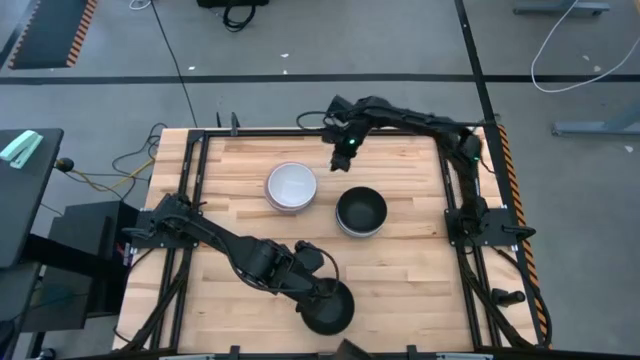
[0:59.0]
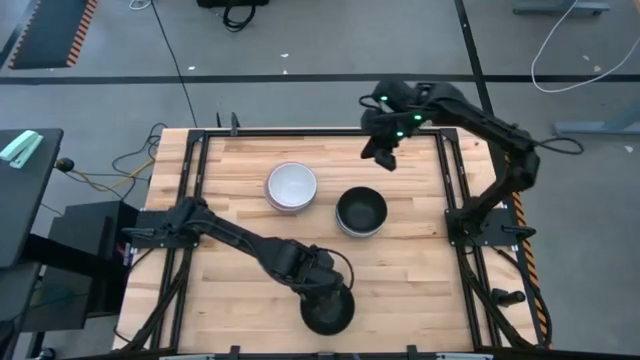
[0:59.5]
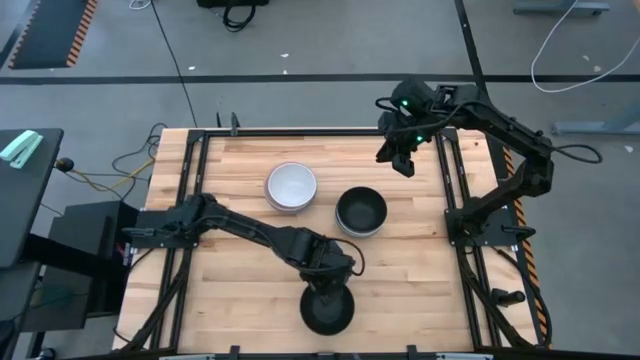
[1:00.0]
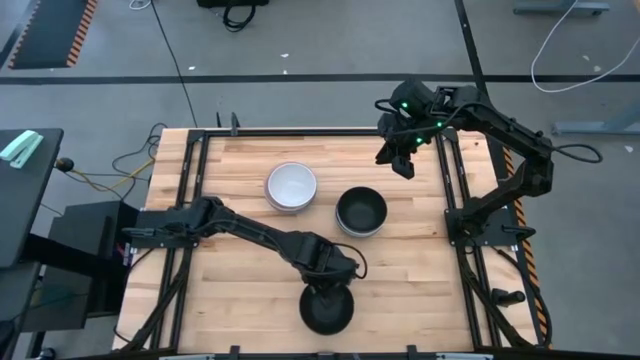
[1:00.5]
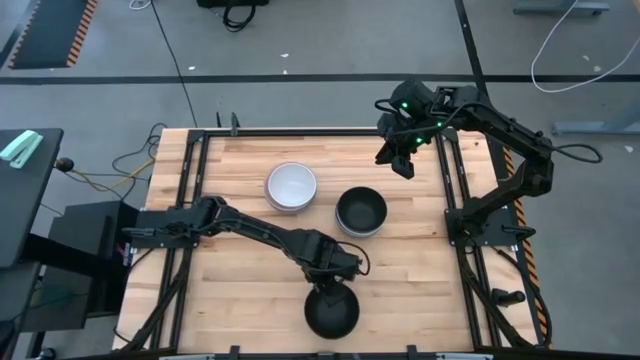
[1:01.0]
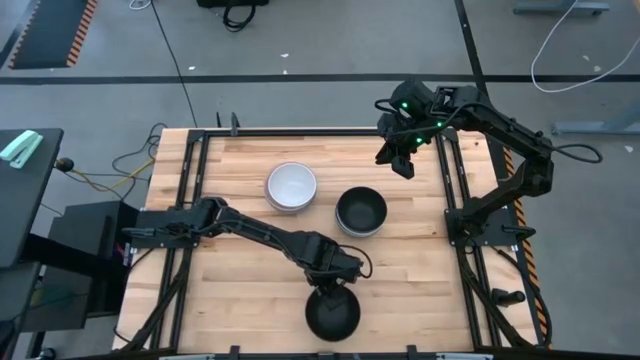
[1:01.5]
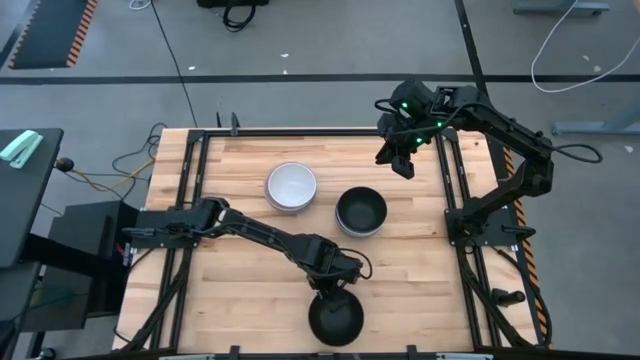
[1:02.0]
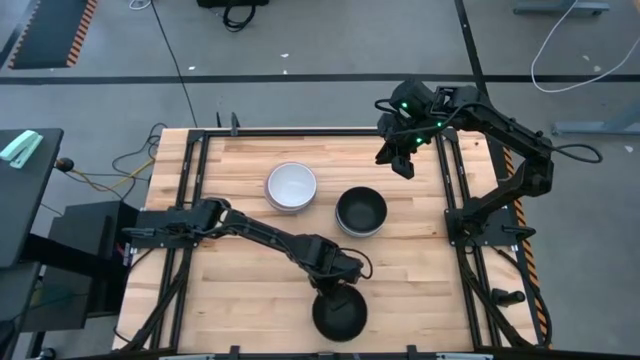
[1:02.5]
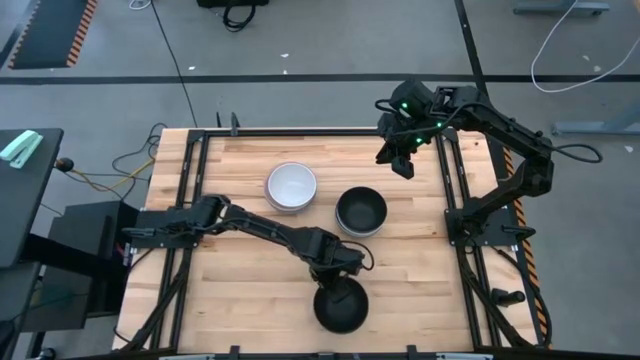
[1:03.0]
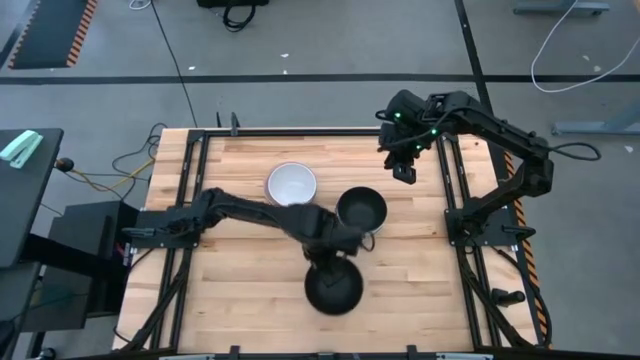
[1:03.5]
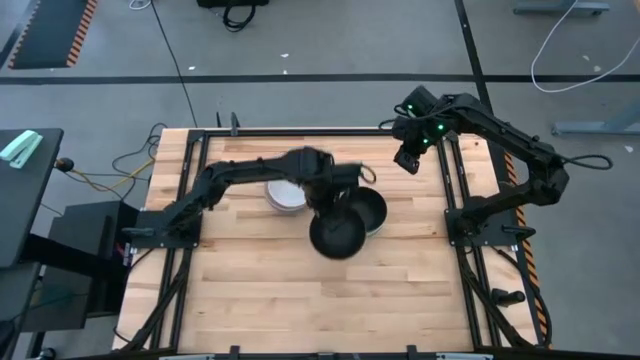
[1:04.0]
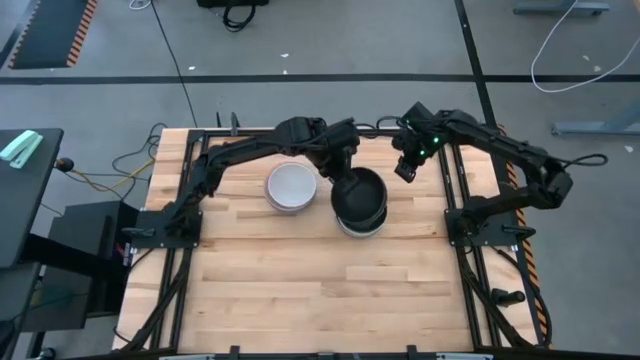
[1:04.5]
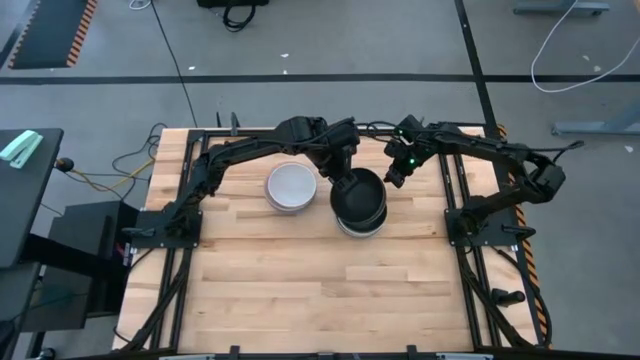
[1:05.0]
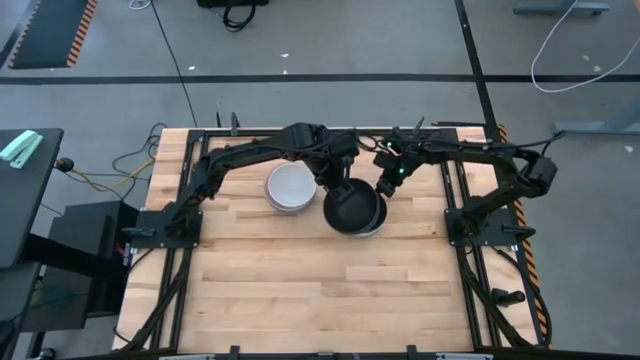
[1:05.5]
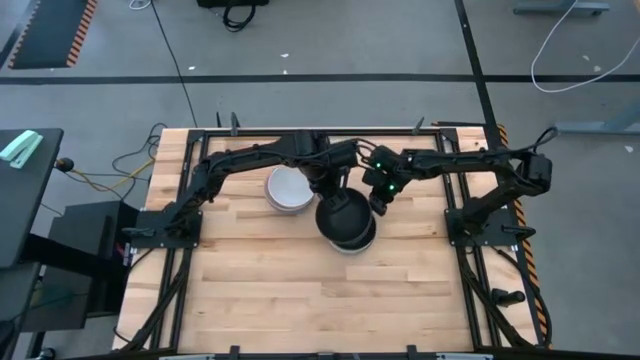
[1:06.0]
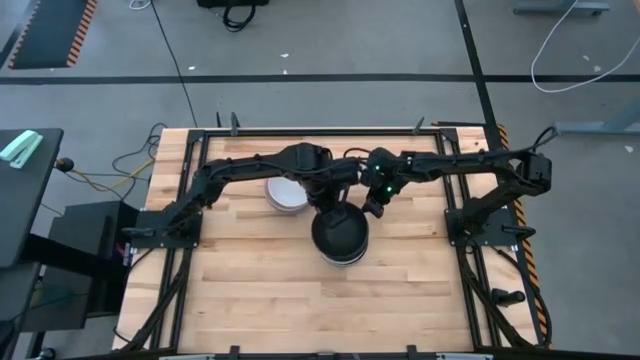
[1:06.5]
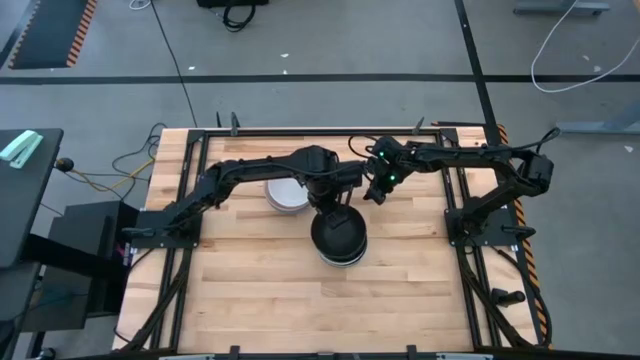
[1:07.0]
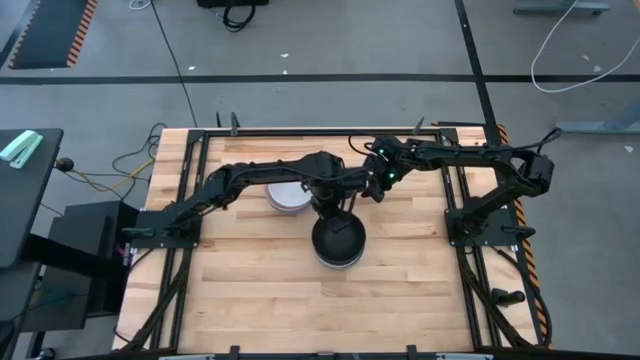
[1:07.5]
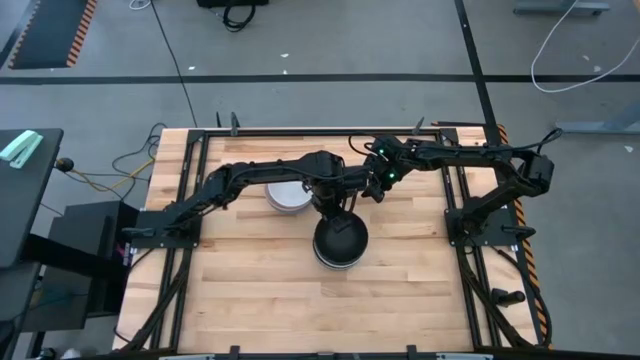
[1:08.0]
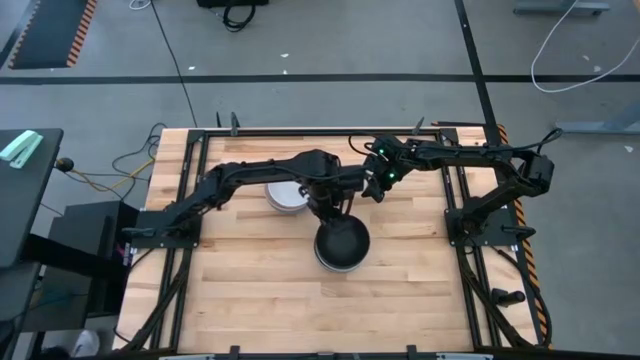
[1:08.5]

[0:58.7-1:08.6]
Task: Nest bowls inside each other
Stack the bottom stacked bowls on top of the black bowl

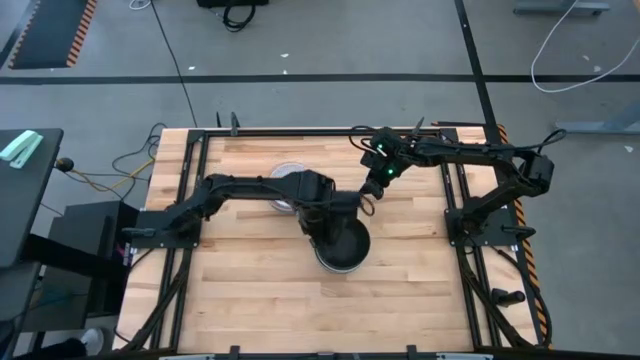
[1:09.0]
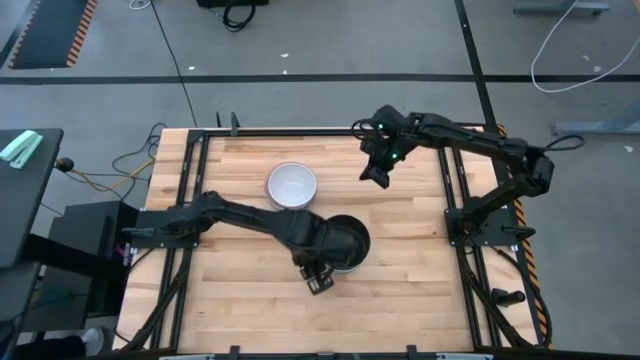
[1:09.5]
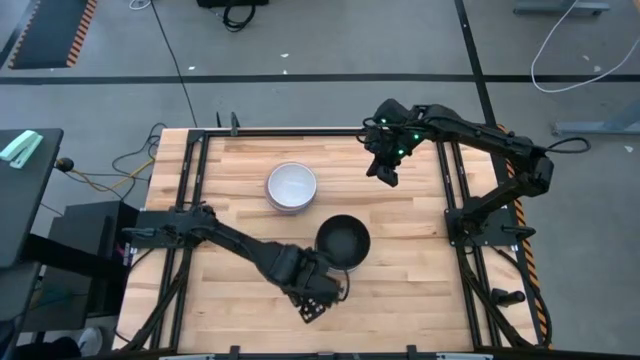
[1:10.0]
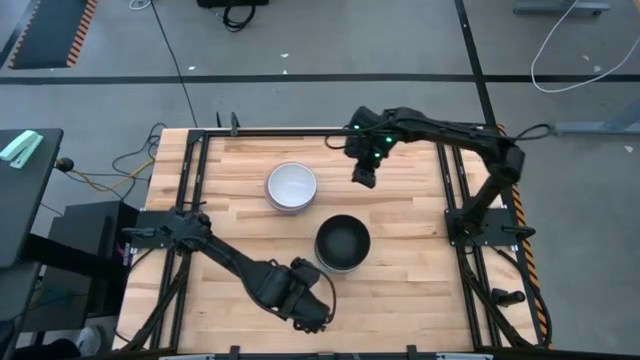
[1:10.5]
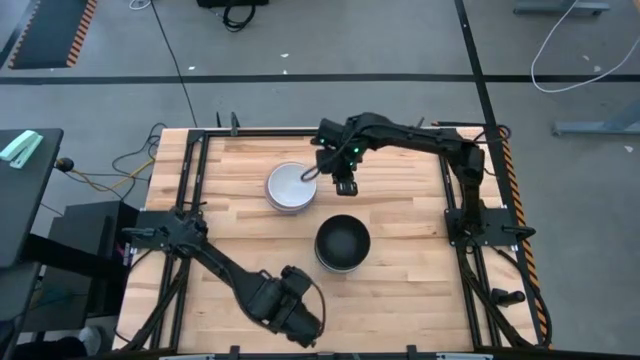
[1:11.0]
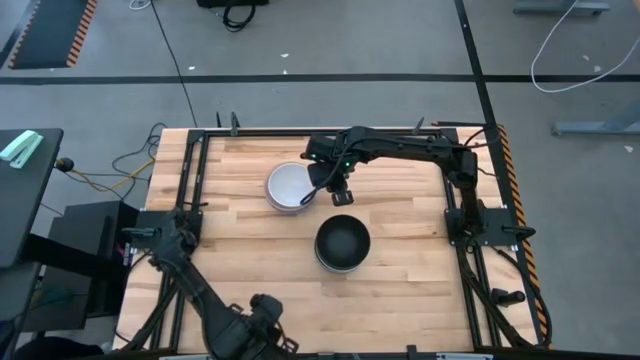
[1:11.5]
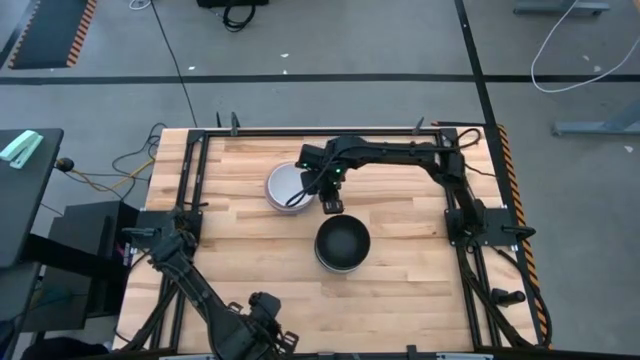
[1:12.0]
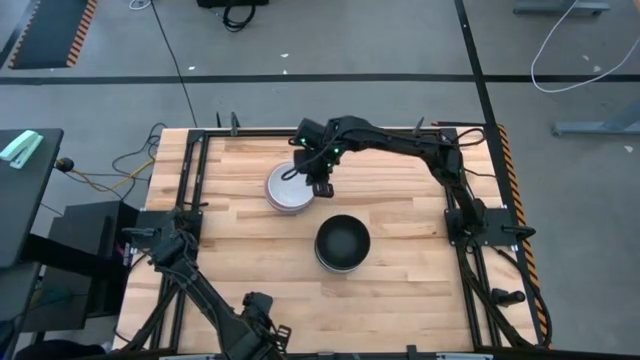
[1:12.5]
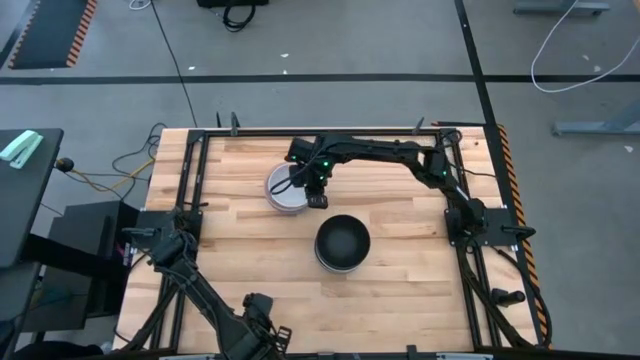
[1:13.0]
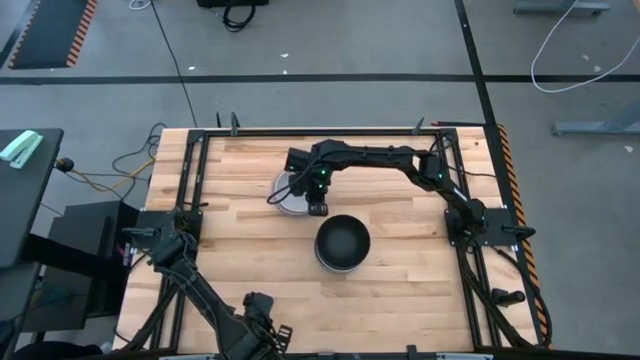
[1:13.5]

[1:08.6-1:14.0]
Adjust the top stacked bowls

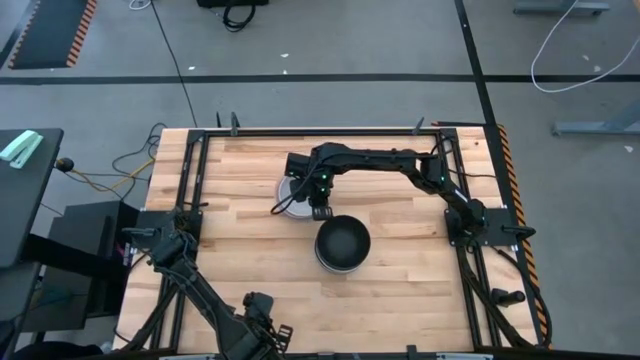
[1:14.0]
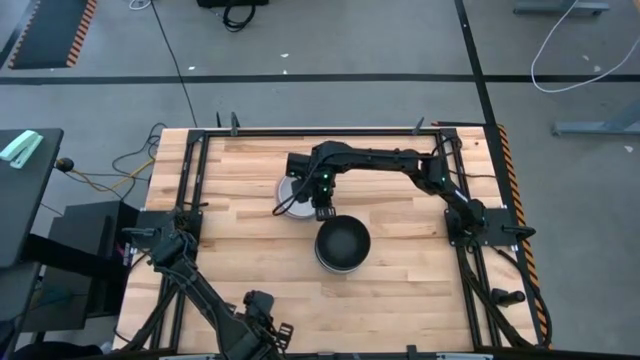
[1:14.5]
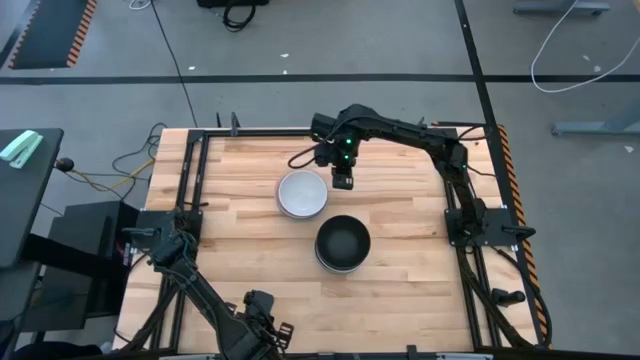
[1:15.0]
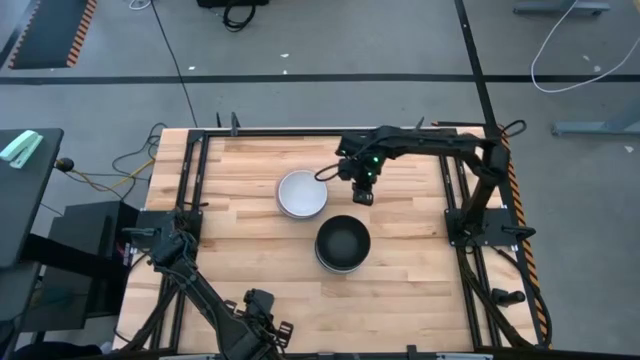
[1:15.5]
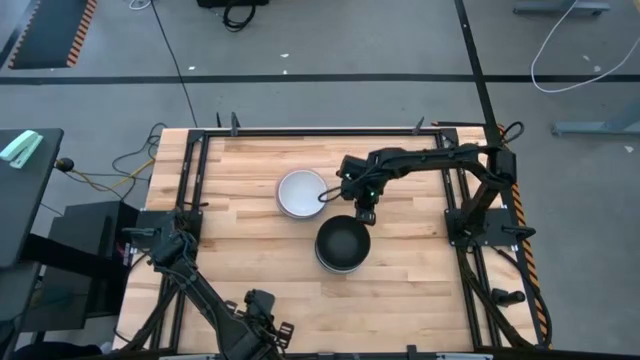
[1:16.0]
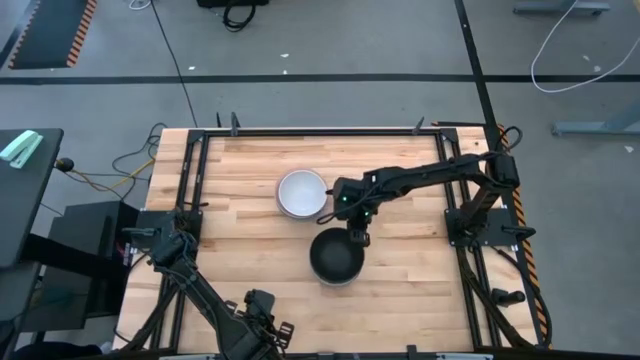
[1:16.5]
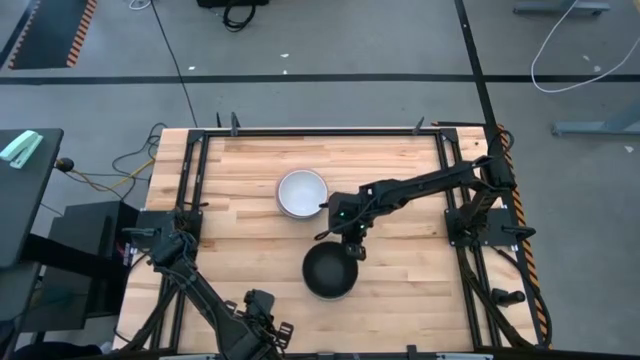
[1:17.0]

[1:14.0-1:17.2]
Adjust the bottom stacked bowls

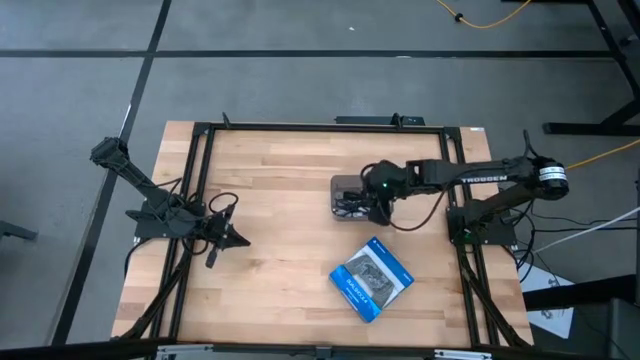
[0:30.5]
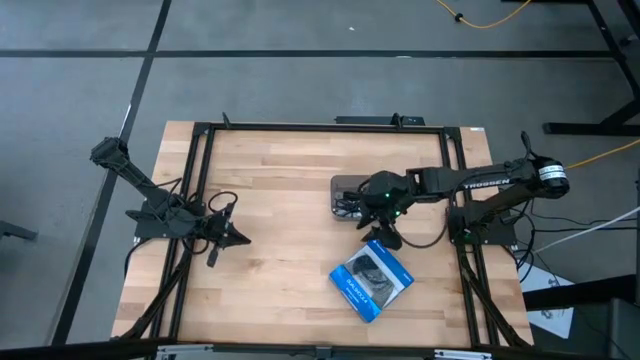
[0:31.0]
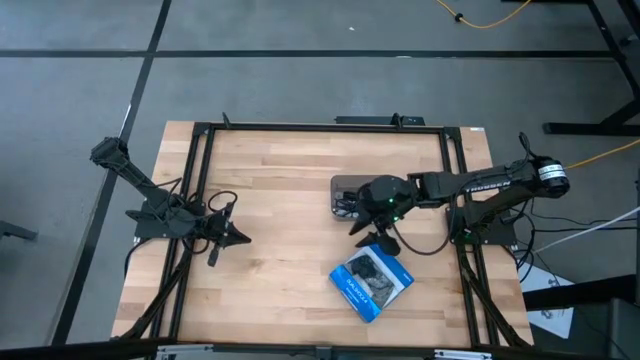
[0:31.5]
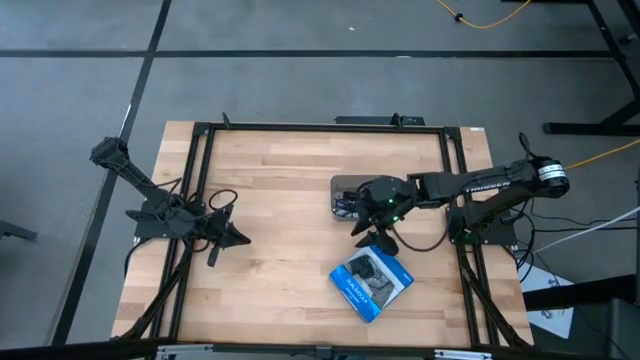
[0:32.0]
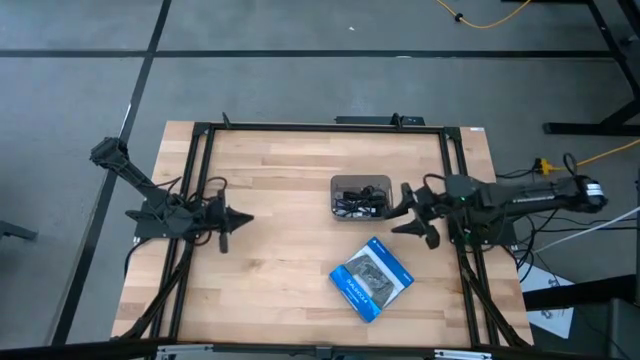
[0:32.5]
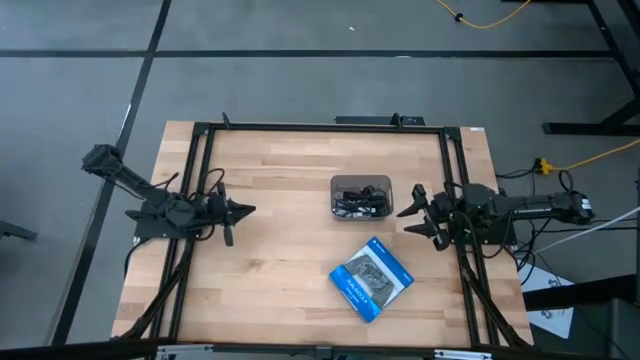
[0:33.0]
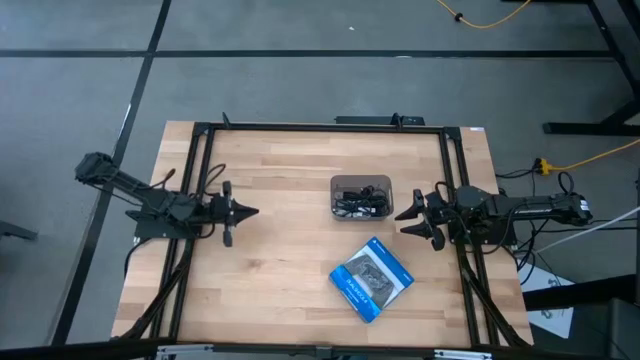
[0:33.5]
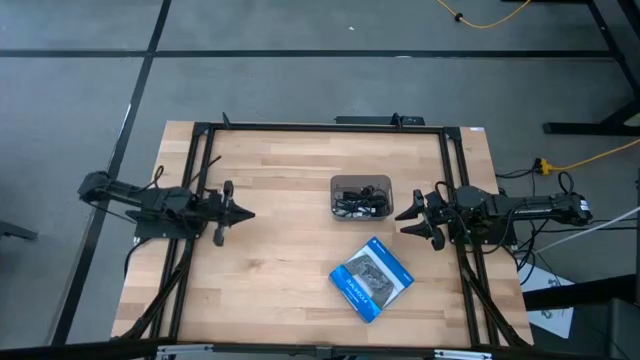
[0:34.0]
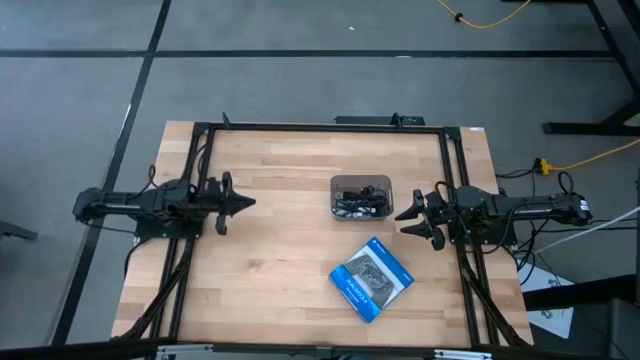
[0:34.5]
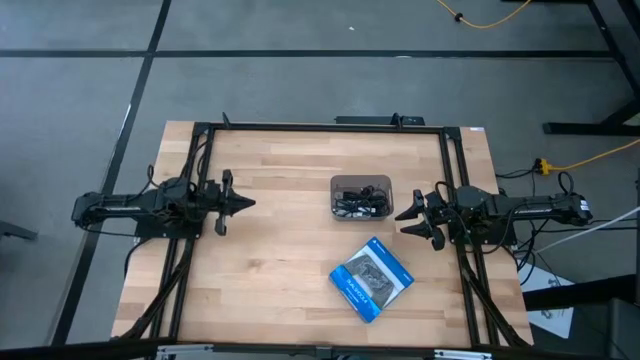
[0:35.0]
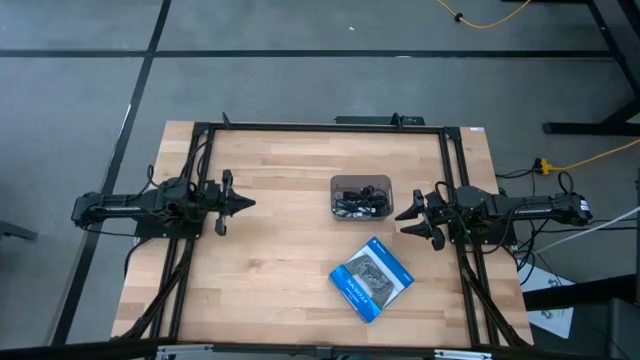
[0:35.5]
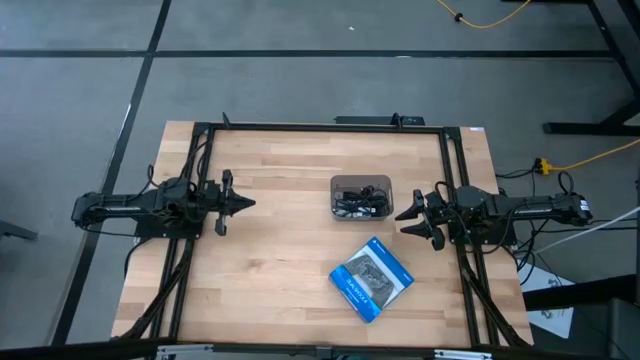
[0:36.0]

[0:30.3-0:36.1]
Task: Pick and place USB-C Cables
Return to Home Position
